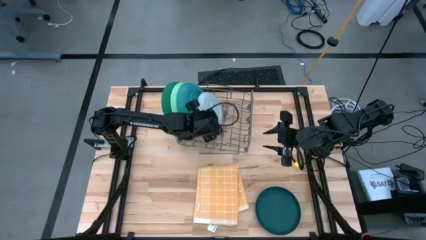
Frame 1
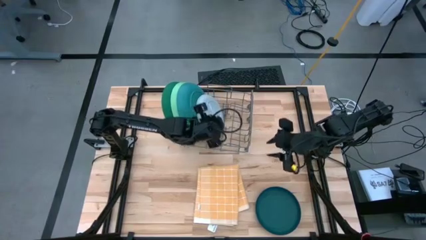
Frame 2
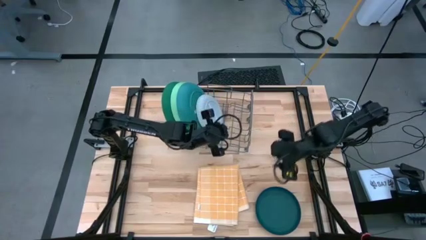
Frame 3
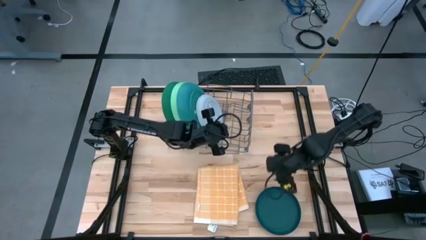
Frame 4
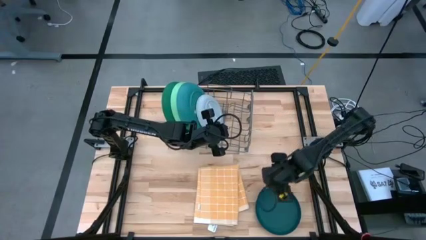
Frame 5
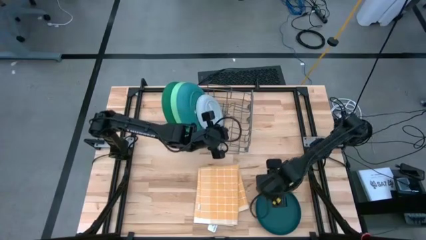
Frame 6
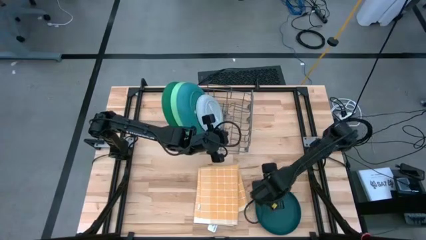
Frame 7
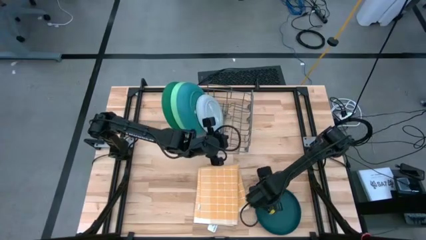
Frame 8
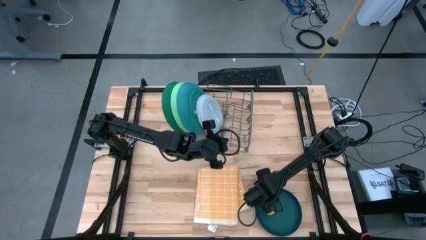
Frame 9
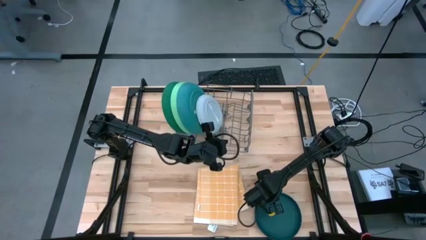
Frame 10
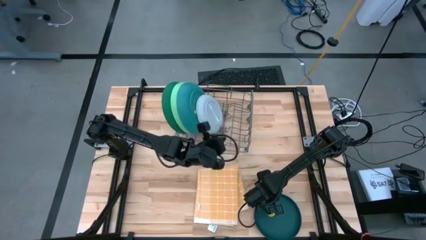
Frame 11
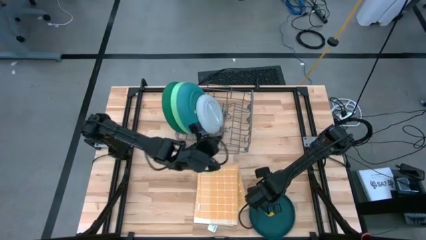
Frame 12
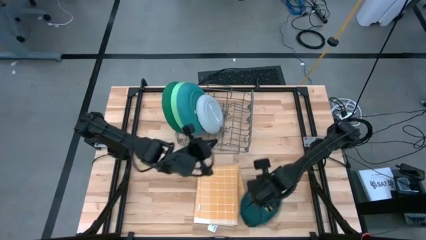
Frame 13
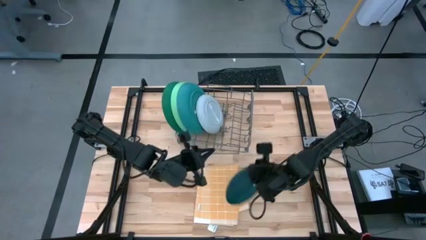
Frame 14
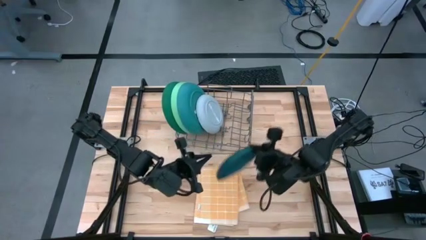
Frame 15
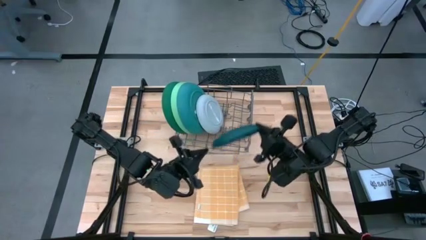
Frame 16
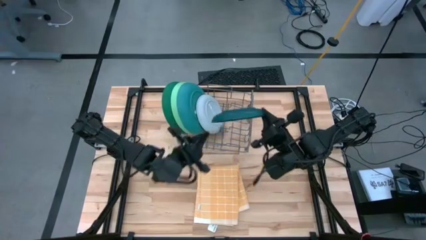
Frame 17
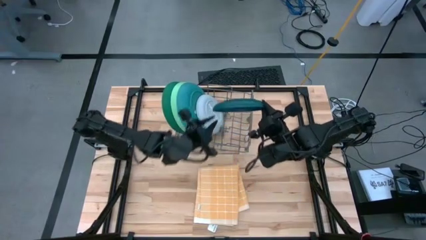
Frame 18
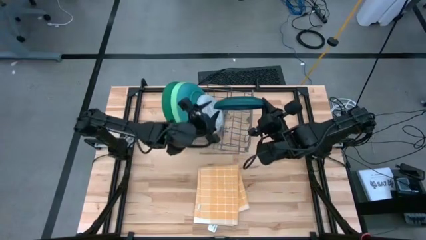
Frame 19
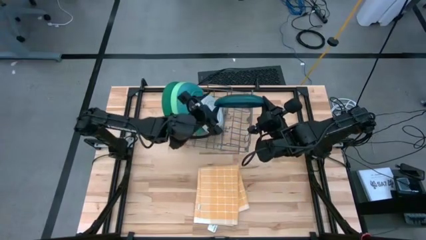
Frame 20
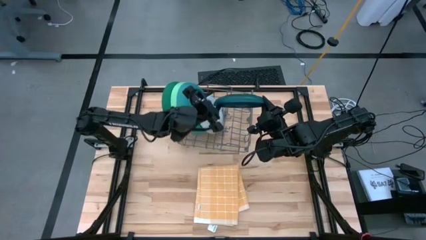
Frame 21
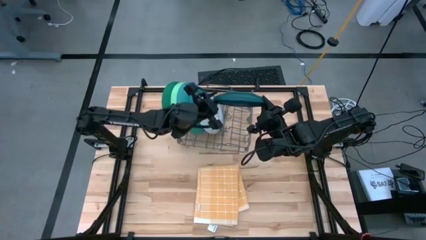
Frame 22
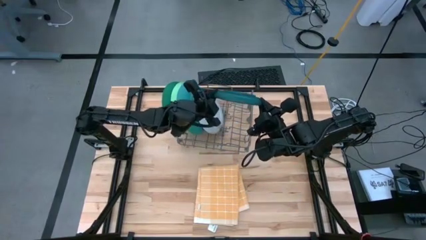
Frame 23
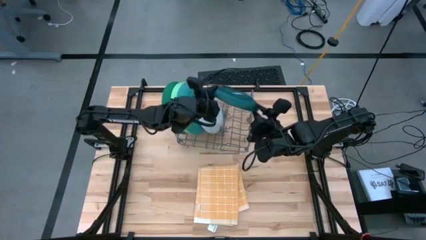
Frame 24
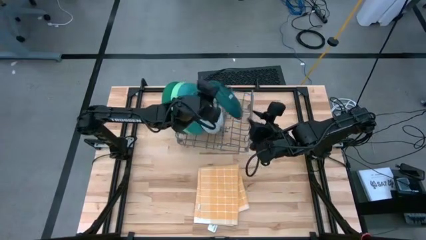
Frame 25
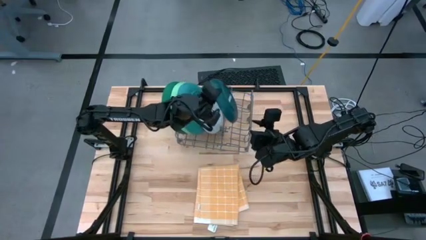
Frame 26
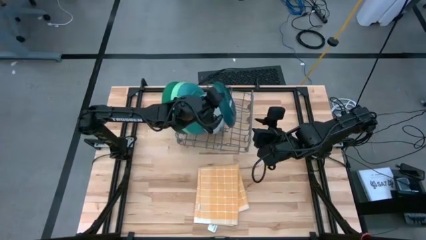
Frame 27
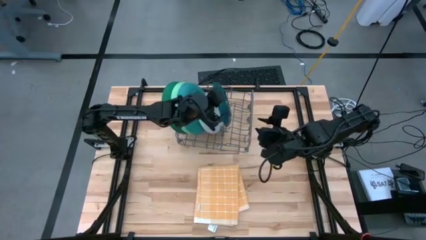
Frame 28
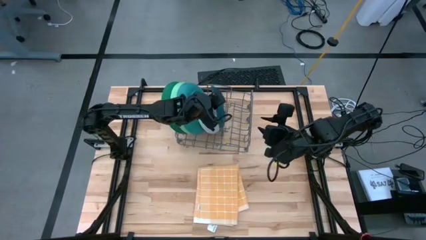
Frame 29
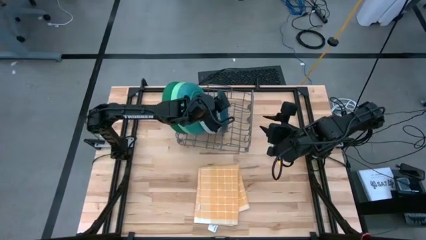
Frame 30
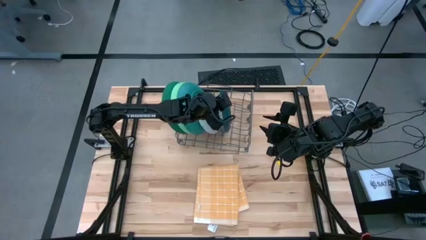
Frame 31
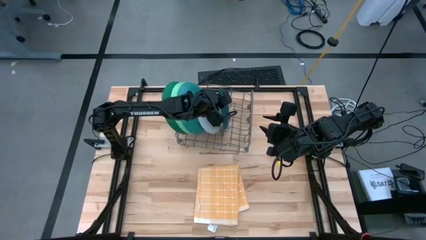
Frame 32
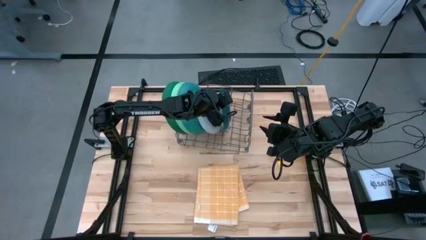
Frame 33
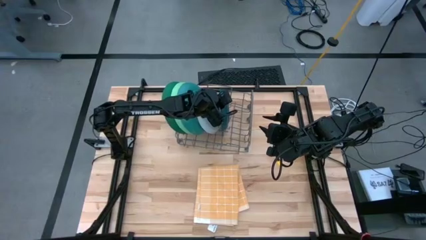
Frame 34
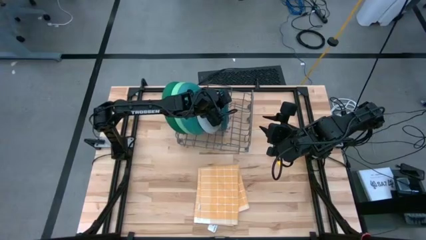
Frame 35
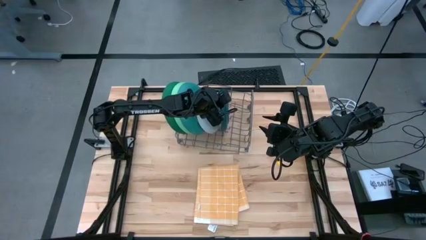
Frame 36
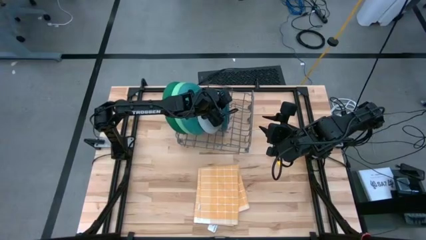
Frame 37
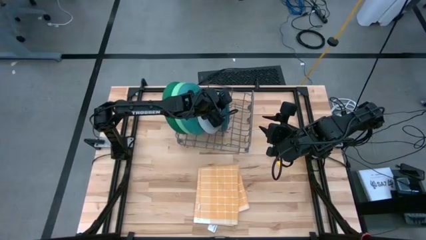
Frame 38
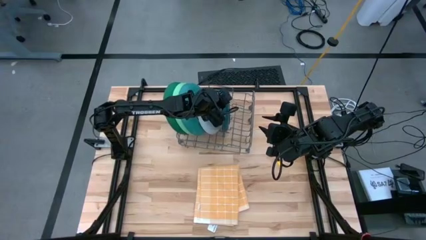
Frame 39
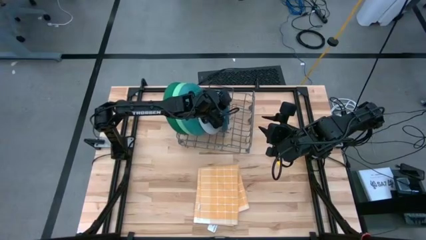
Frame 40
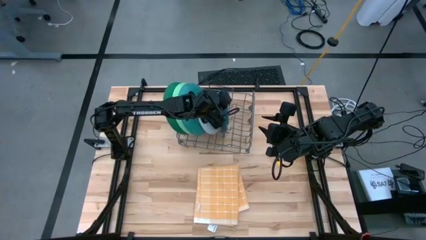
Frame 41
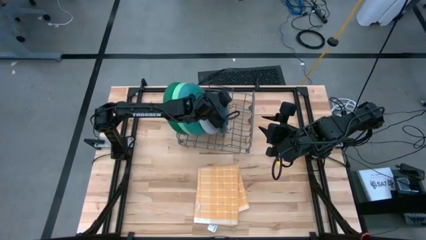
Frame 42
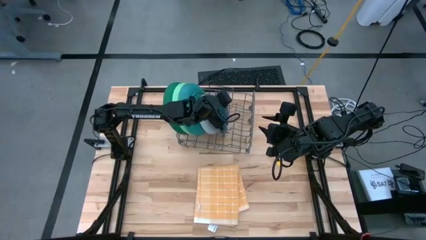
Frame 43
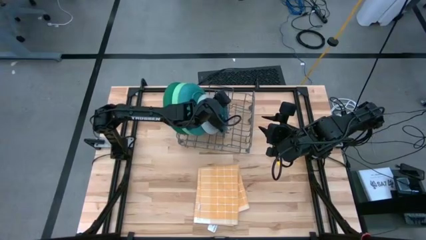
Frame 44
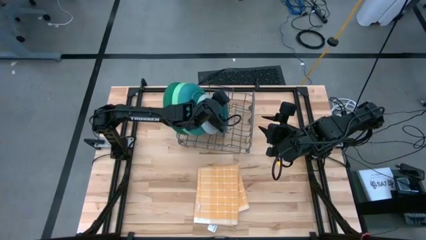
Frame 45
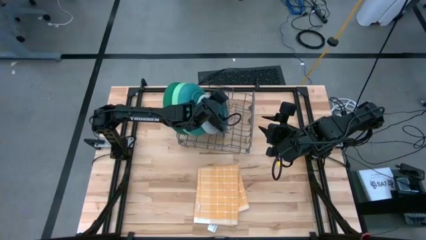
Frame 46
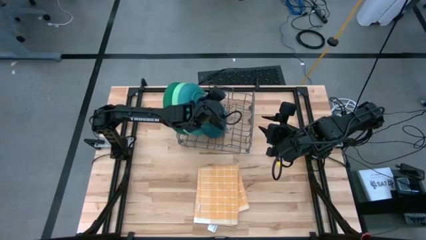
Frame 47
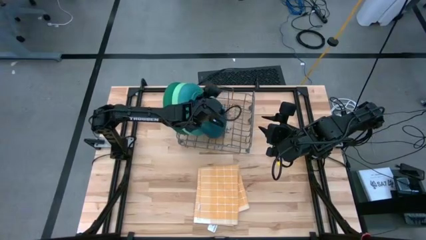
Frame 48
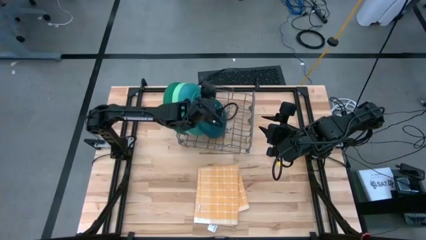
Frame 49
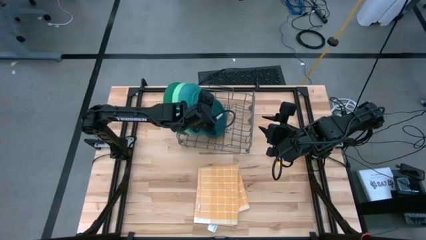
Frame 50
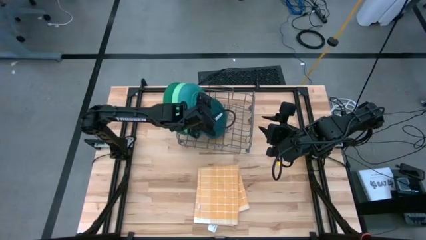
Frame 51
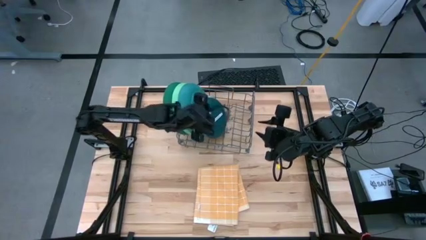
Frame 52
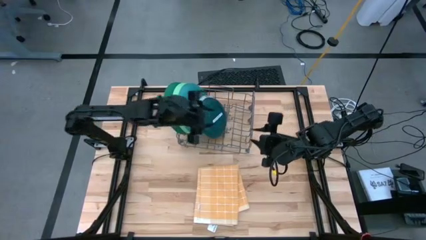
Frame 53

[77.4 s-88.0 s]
Task: Sort dishes
Put the dark blue plate in the dish rack

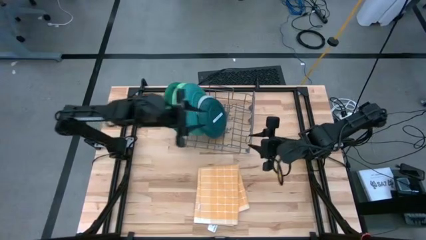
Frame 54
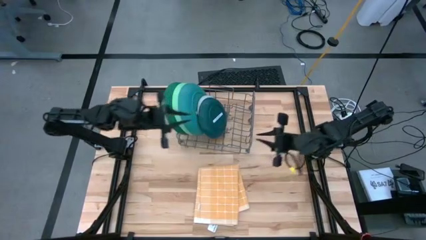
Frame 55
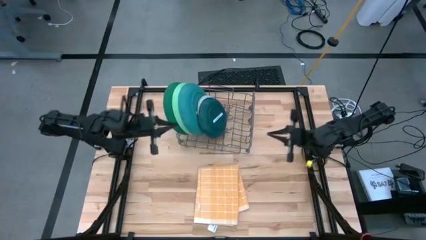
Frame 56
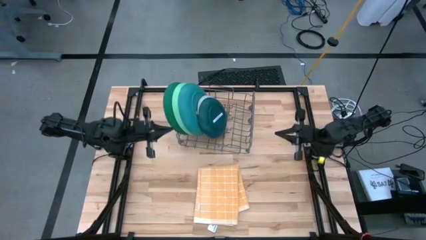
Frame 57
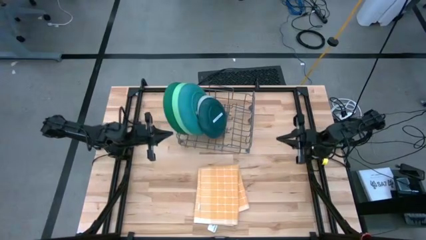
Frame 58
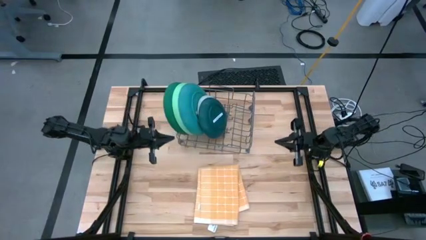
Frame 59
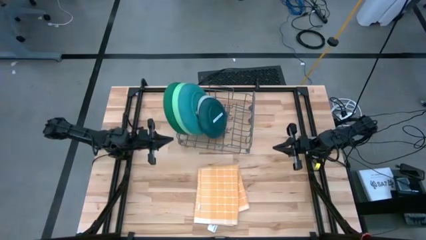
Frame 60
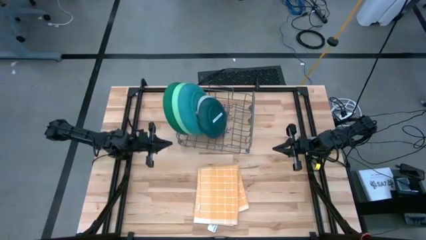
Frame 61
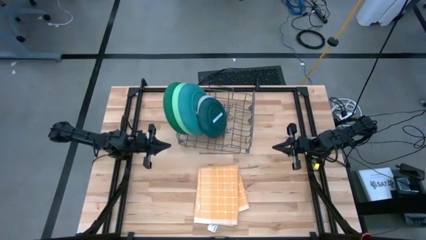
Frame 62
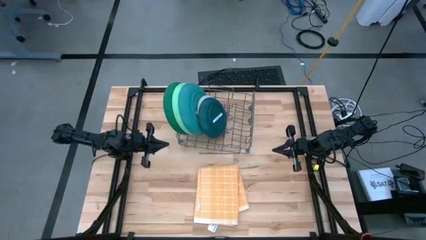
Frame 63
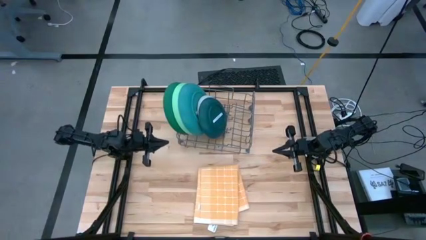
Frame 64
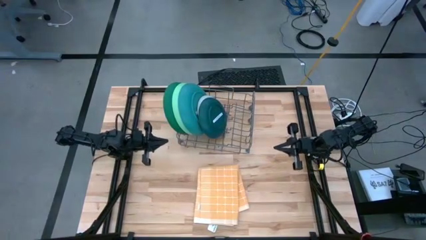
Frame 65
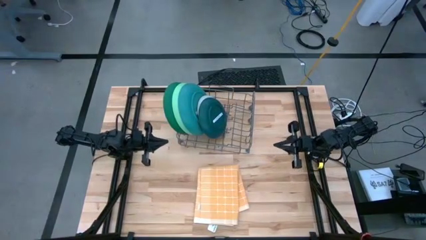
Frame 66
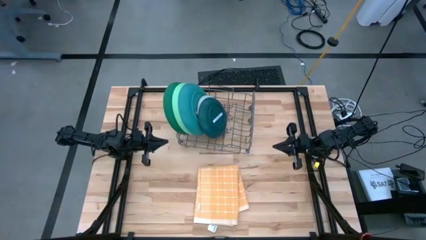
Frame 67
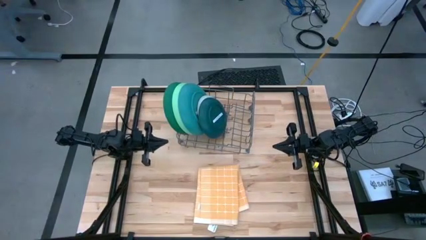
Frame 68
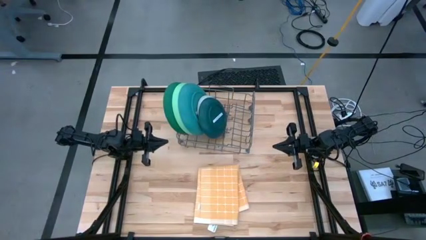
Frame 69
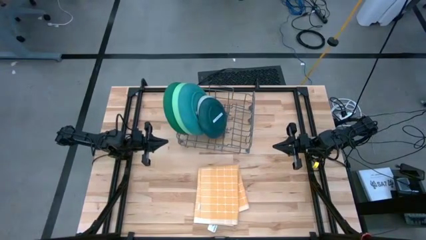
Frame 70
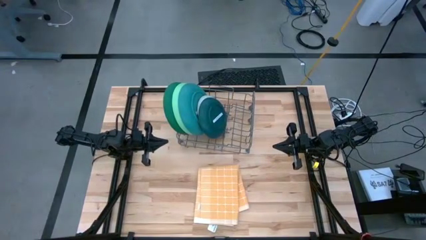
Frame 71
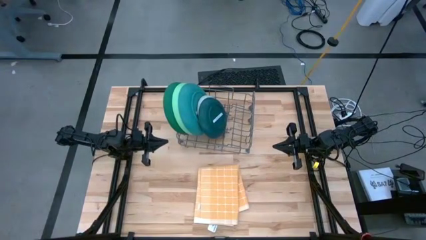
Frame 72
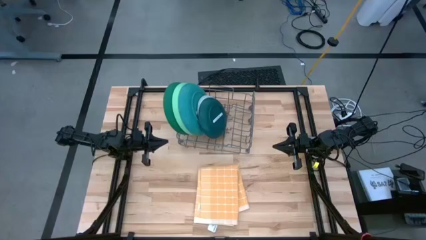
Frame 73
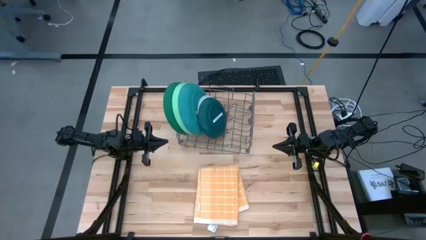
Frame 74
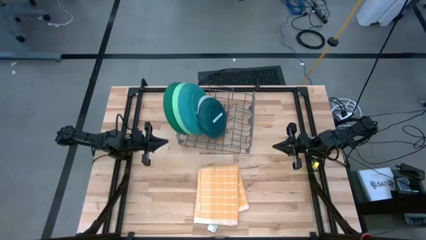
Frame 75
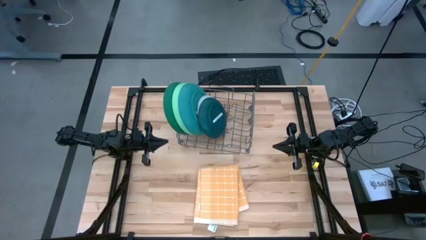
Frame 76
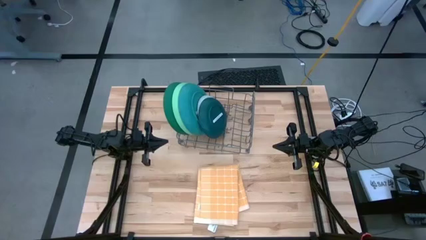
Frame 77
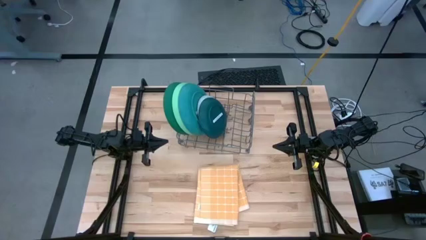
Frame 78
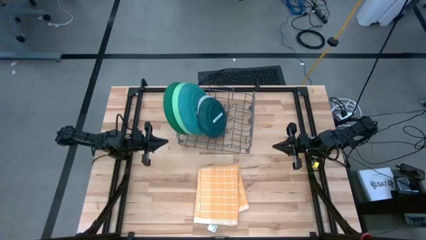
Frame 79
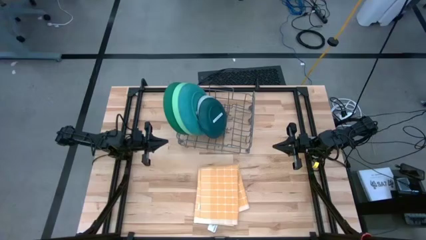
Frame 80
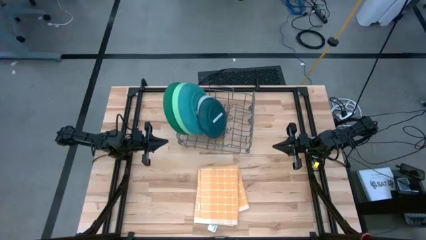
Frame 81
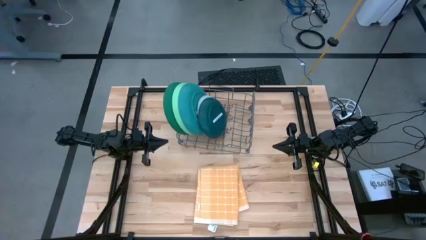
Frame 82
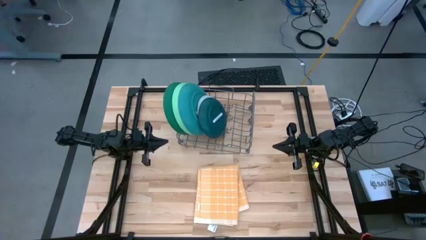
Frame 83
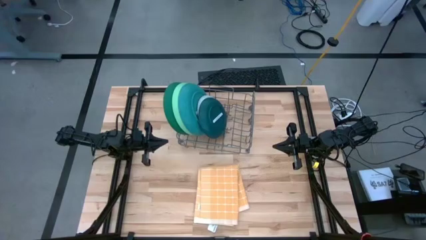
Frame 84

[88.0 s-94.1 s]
Return to Home Position
